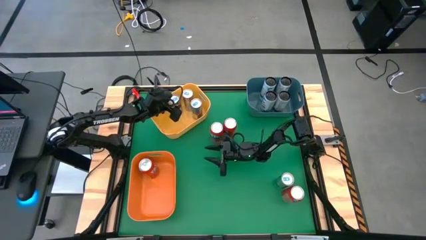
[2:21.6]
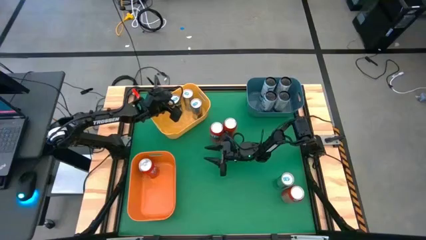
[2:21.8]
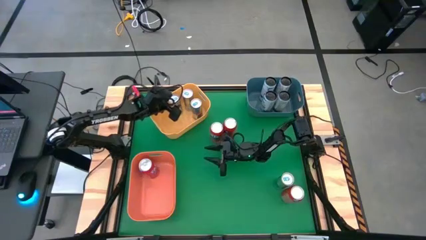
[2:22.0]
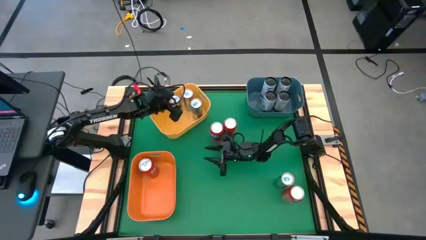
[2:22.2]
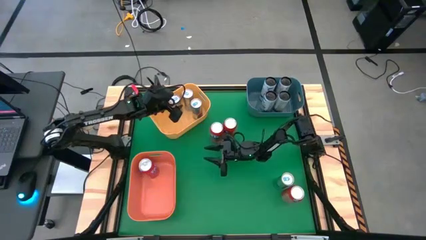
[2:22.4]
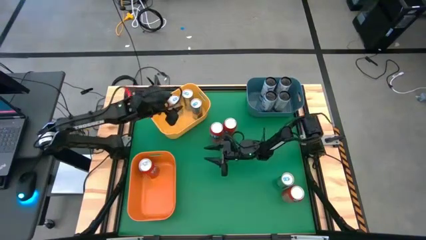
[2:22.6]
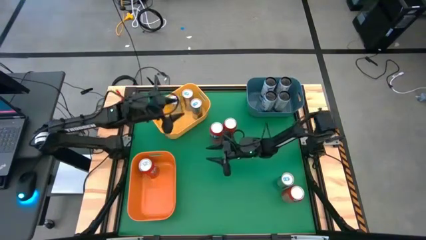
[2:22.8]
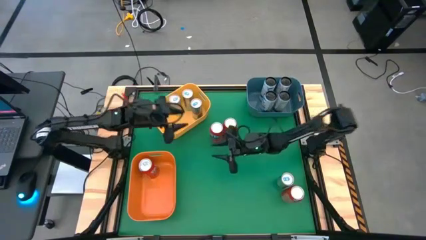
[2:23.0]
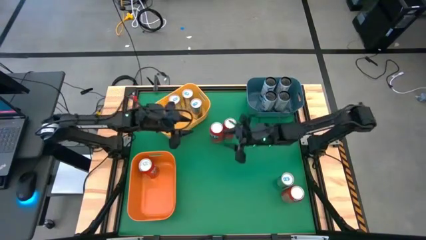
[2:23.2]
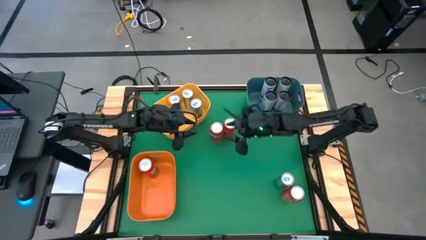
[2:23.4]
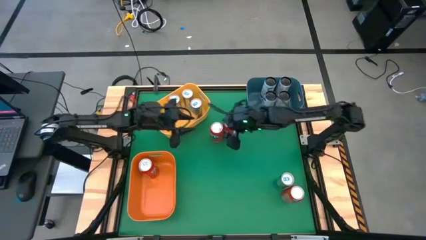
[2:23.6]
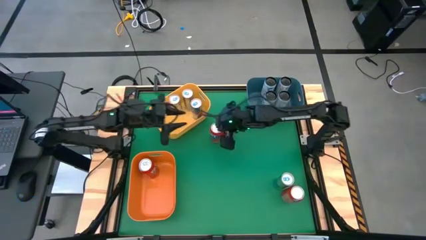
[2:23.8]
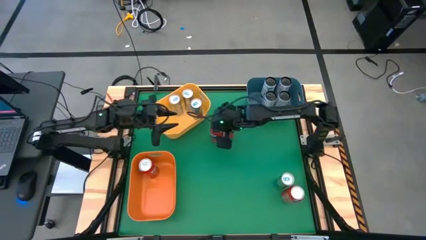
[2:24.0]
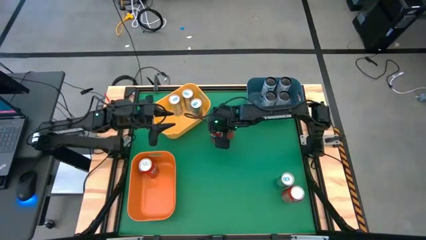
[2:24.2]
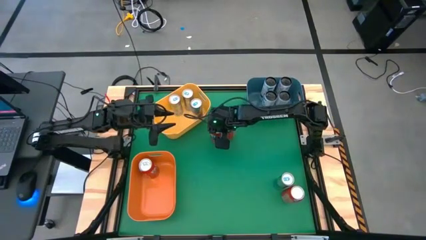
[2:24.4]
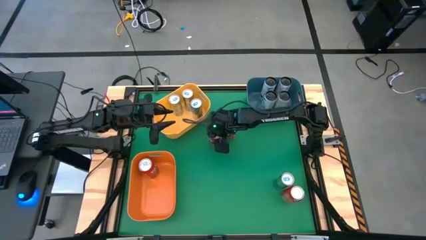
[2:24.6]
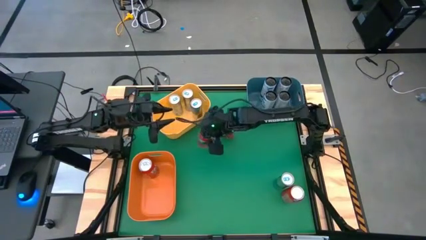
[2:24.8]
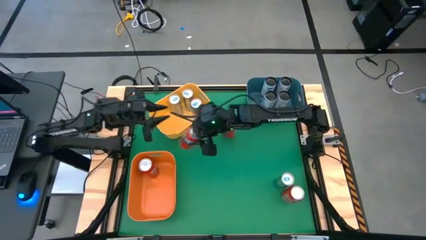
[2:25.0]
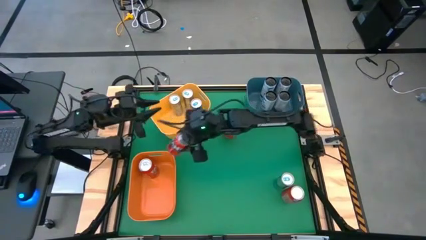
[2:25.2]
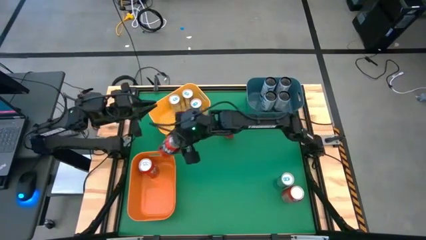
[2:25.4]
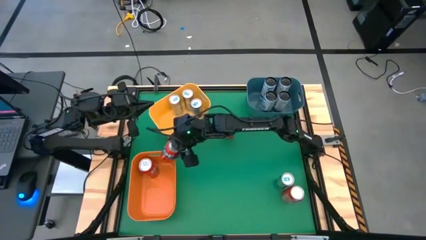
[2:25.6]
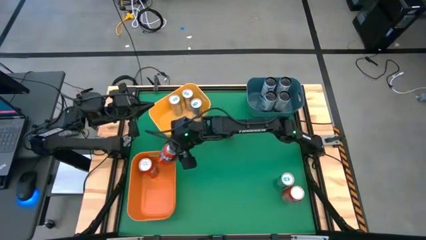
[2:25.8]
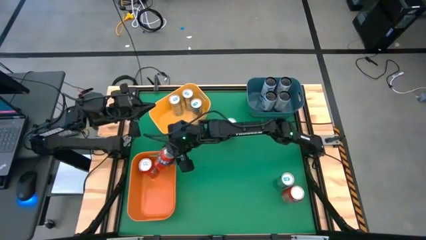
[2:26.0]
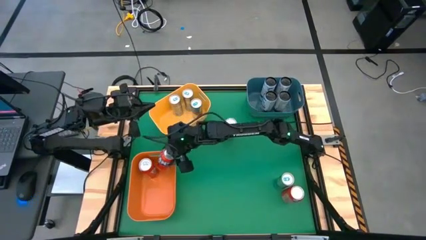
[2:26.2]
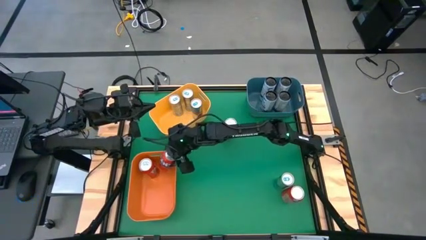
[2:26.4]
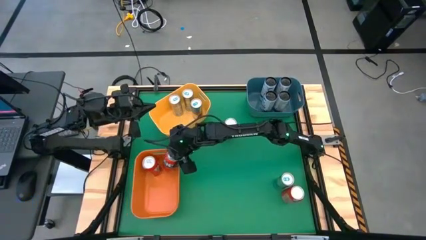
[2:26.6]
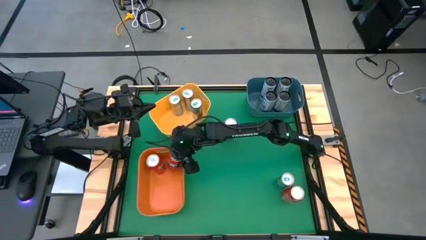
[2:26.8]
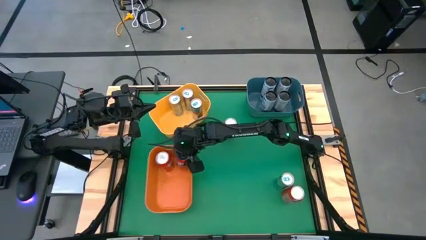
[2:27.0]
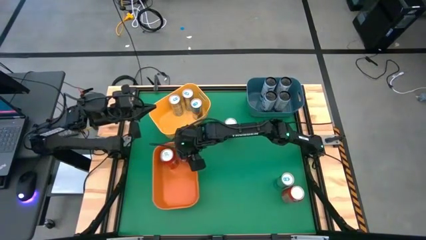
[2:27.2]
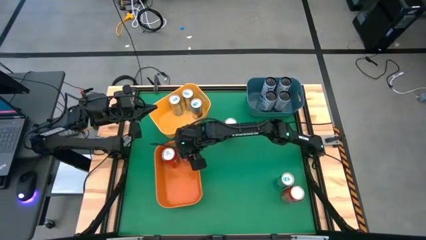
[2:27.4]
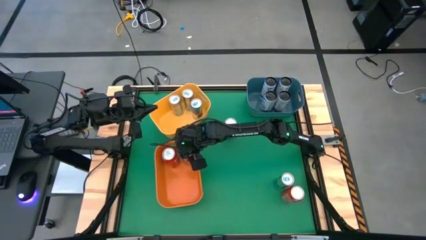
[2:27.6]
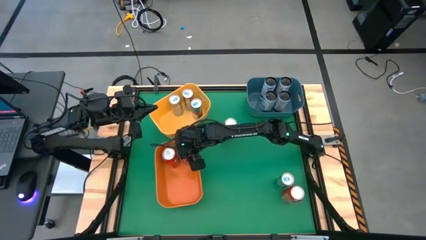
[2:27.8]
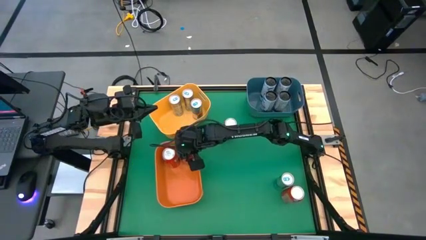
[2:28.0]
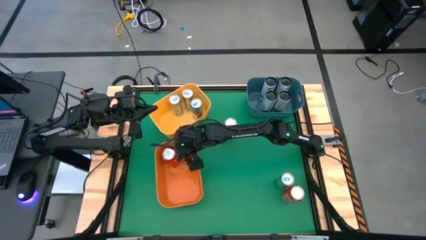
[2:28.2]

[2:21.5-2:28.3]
Task: Sort soda cans
Put the orange soda can into the orange bin

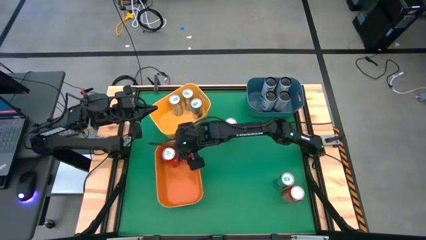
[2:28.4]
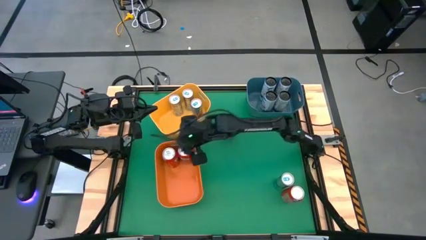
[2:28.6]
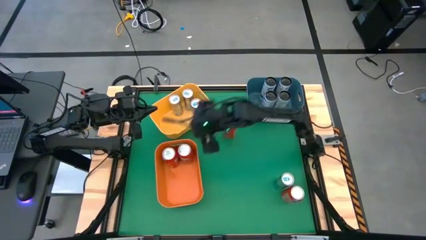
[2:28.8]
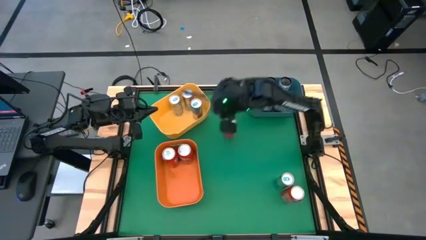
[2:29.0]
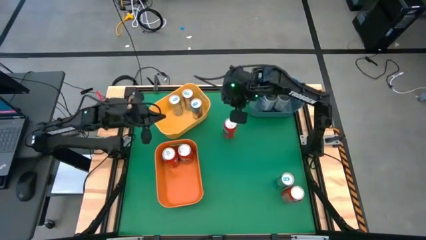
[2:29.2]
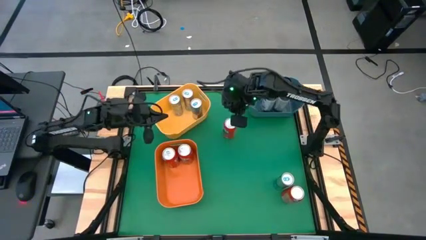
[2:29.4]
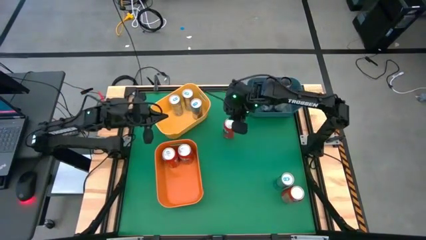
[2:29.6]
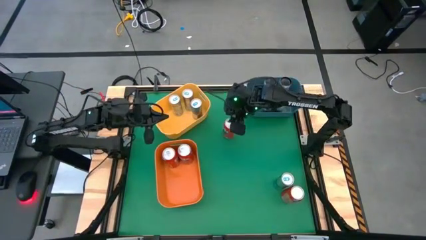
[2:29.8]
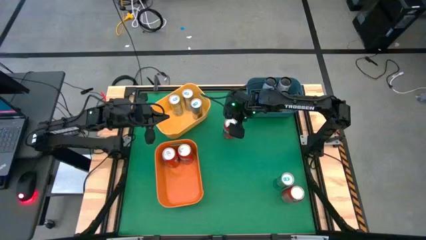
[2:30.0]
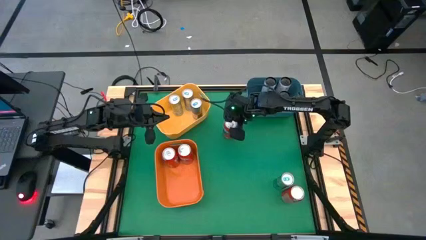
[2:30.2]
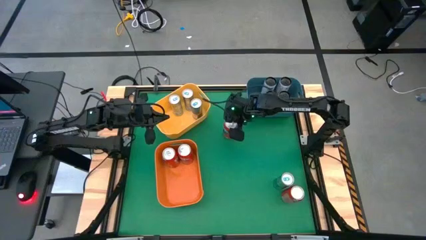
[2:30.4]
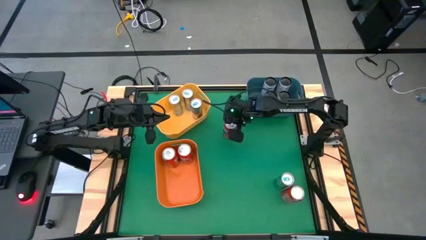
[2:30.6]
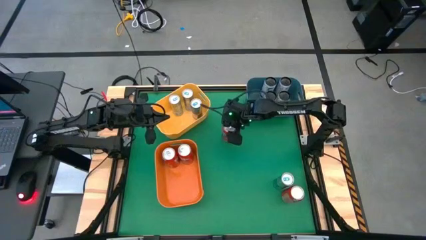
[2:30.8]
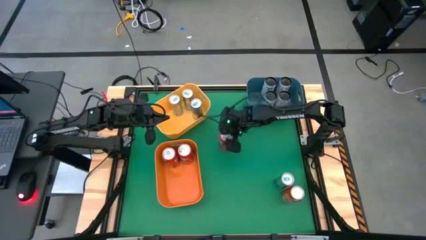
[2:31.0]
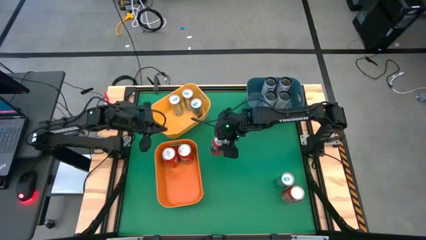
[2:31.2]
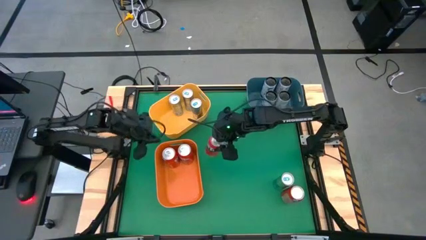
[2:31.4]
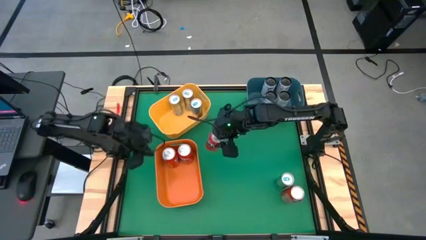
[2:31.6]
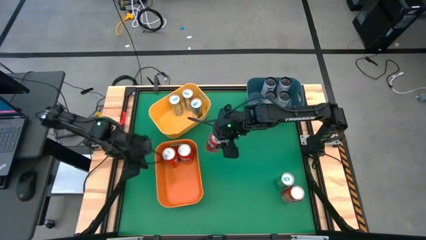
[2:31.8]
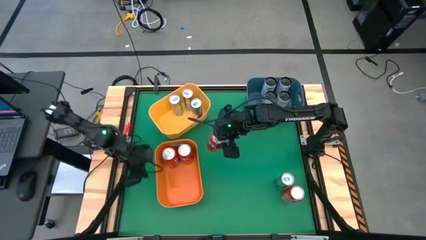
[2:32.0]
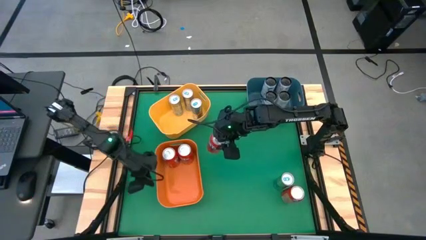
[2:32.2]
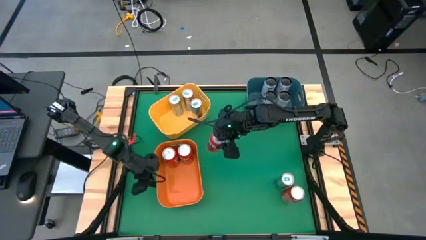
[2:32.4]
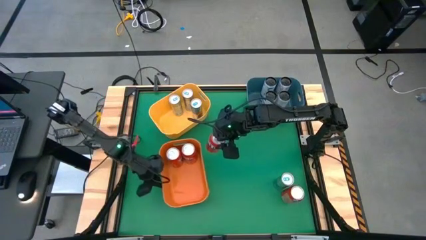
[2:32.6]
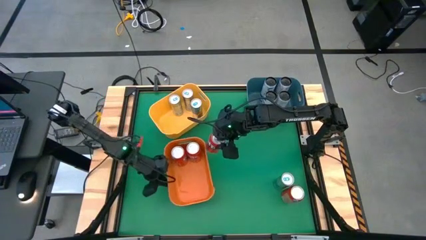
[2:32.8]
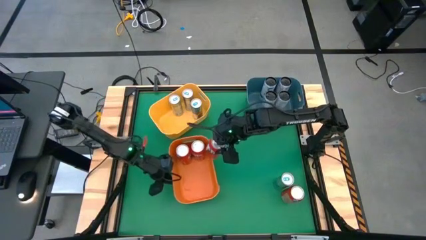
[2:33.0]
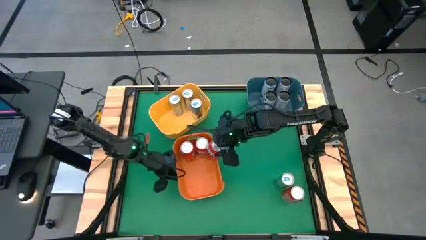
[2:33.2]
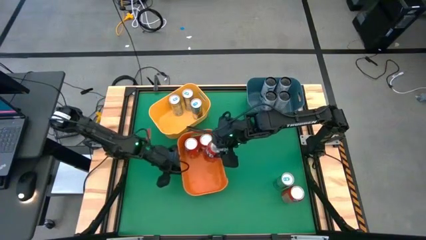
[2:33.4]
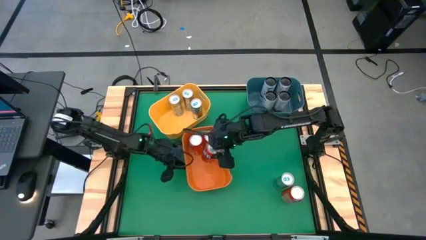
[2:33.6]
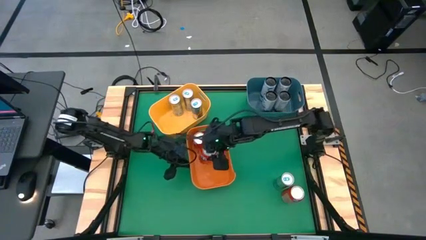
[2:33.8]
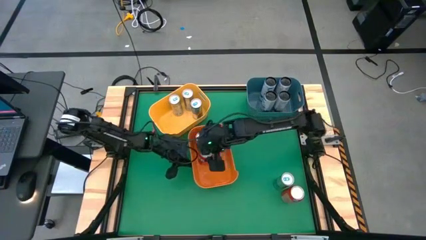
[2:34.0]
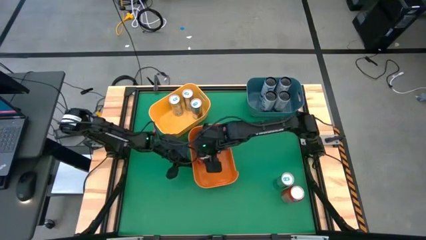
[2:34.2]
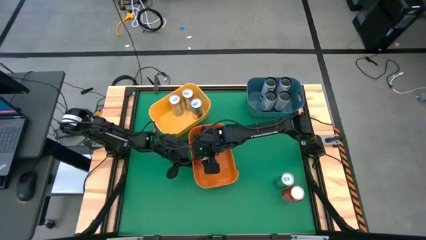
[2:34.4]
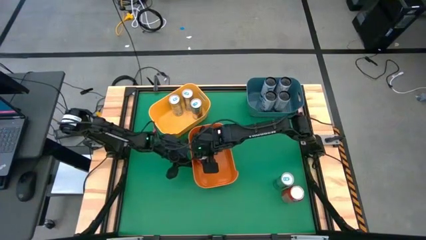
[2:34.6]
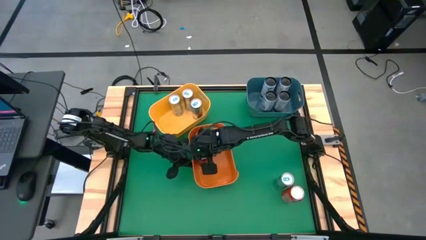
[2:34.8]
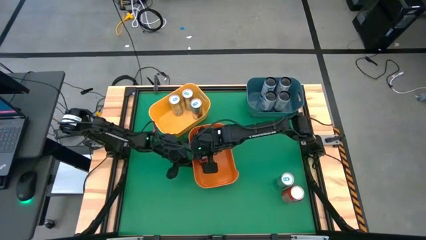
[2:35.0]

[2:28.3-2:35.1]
Put the orange soda can into the orange bin
